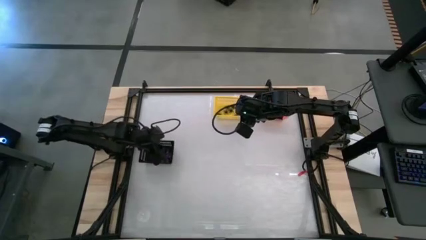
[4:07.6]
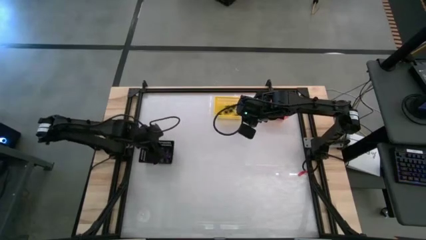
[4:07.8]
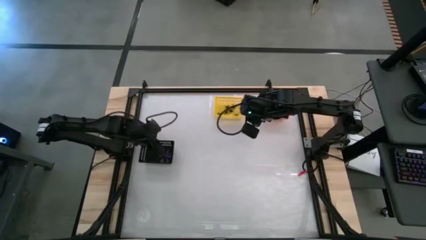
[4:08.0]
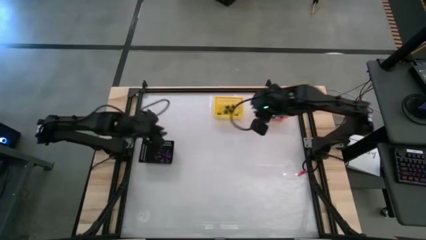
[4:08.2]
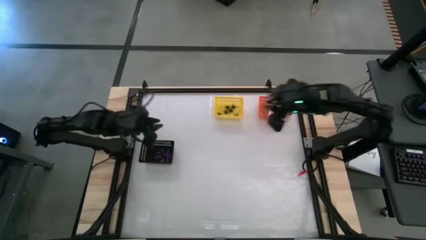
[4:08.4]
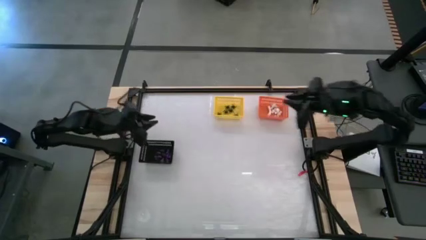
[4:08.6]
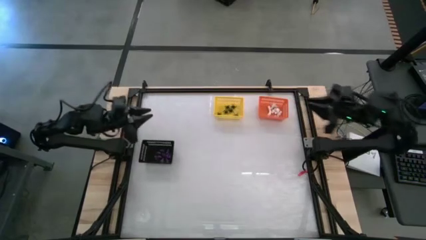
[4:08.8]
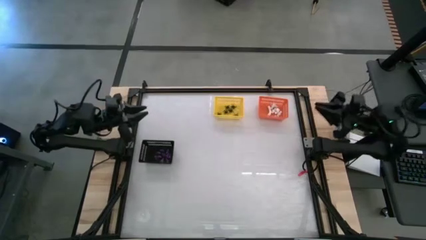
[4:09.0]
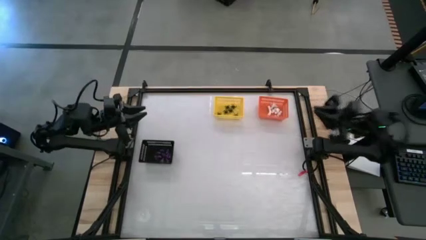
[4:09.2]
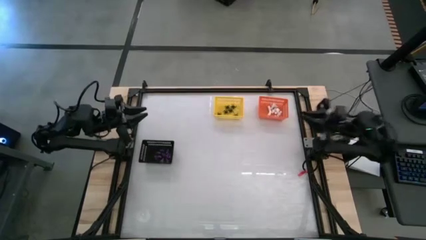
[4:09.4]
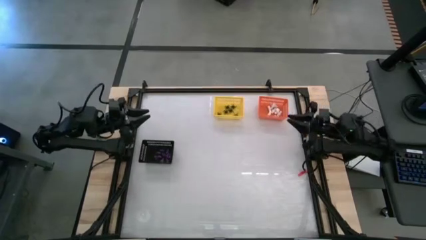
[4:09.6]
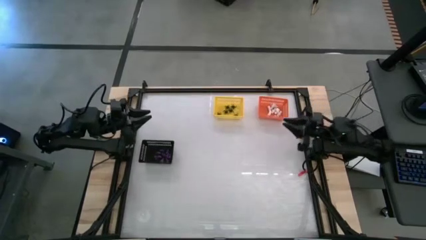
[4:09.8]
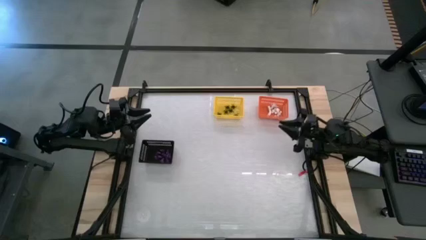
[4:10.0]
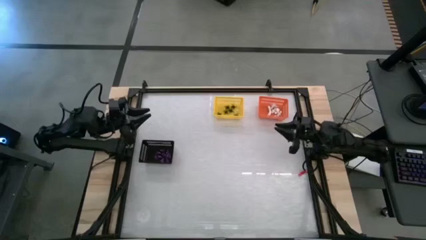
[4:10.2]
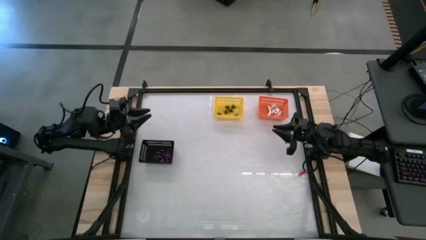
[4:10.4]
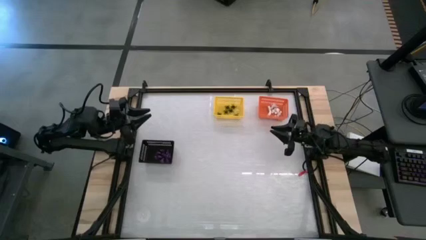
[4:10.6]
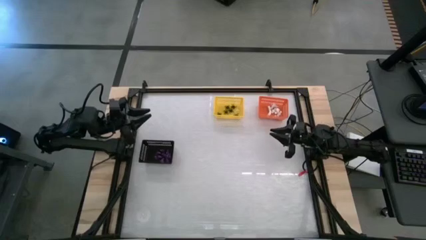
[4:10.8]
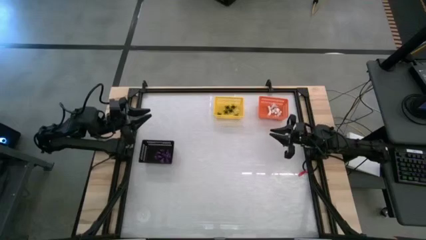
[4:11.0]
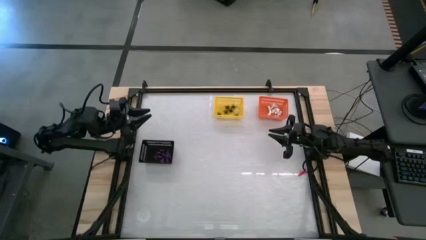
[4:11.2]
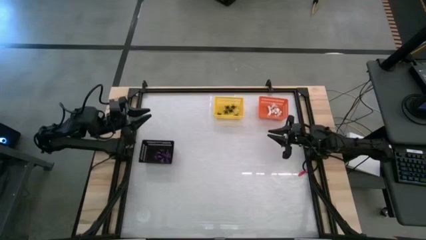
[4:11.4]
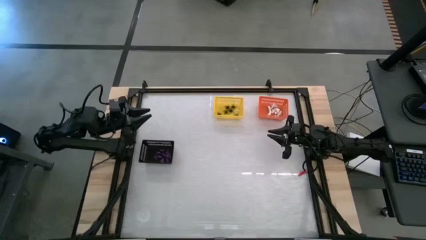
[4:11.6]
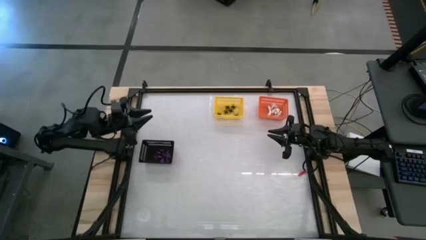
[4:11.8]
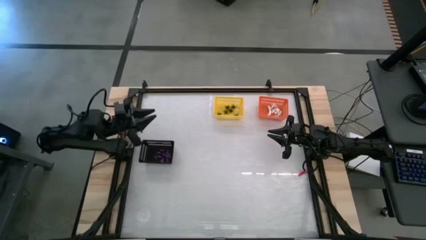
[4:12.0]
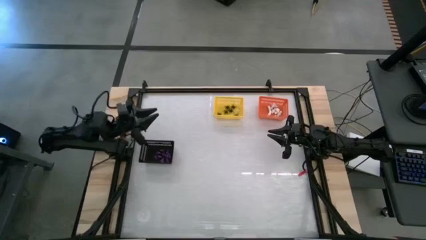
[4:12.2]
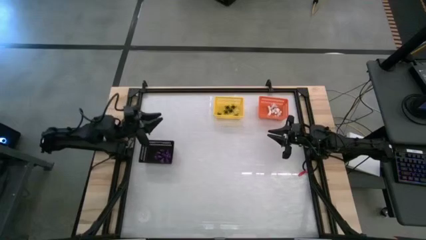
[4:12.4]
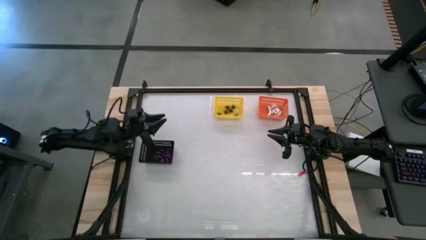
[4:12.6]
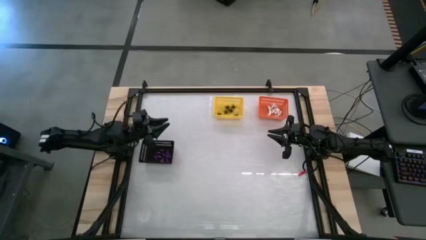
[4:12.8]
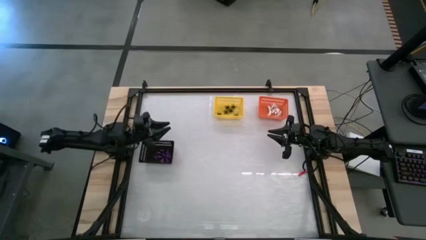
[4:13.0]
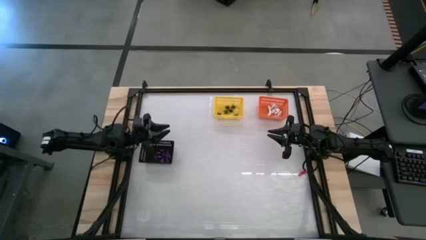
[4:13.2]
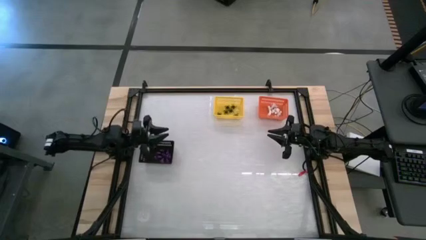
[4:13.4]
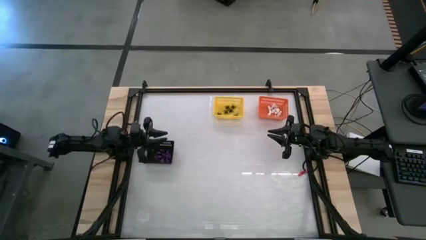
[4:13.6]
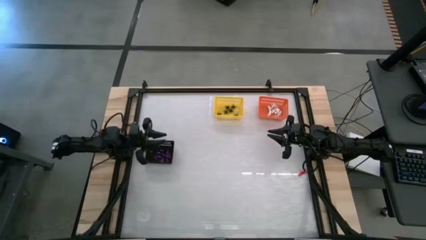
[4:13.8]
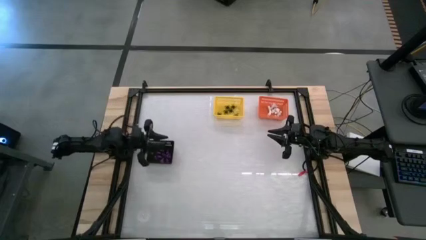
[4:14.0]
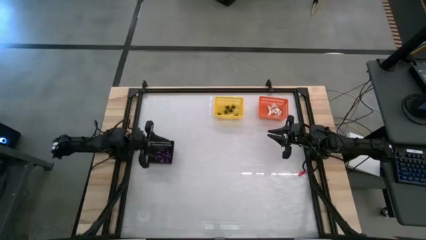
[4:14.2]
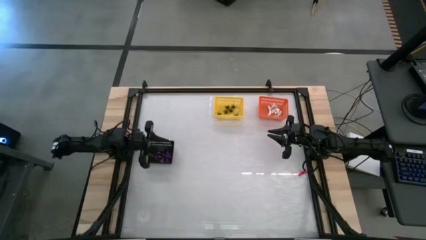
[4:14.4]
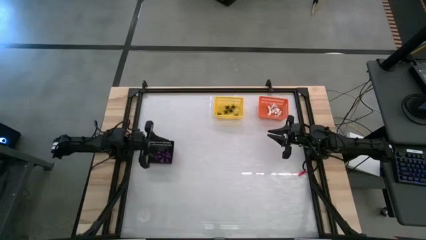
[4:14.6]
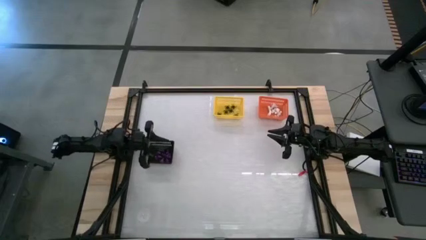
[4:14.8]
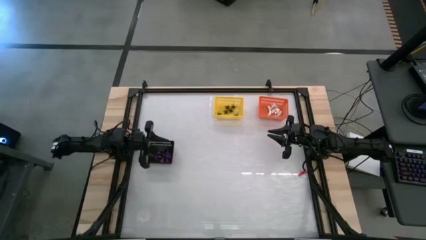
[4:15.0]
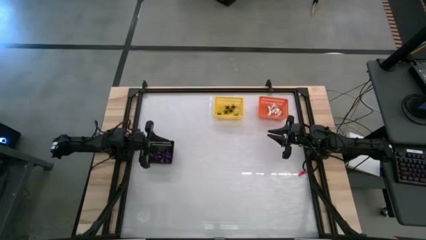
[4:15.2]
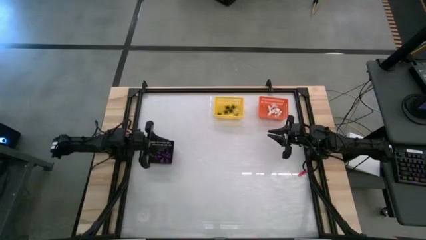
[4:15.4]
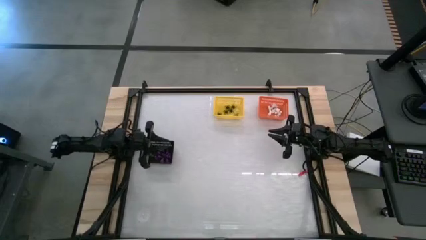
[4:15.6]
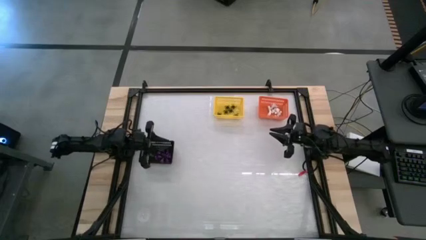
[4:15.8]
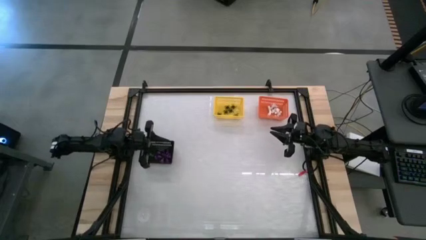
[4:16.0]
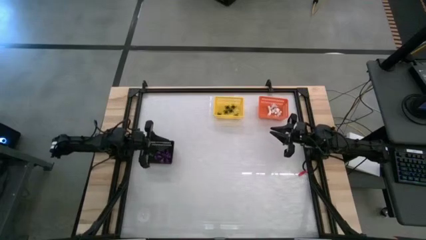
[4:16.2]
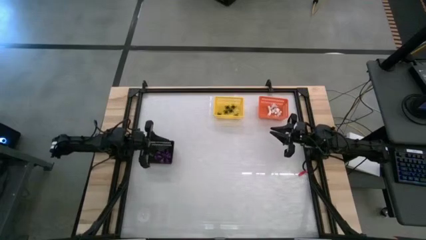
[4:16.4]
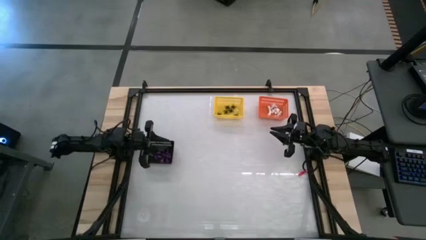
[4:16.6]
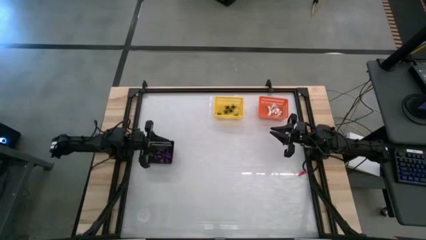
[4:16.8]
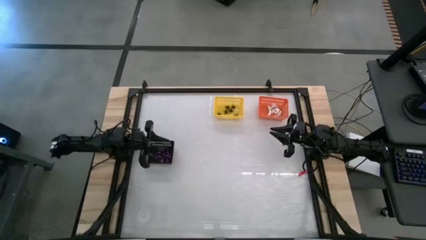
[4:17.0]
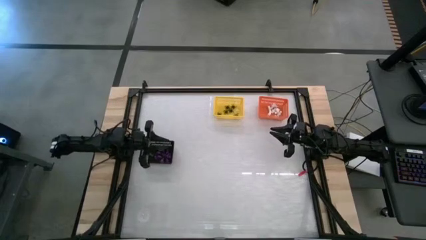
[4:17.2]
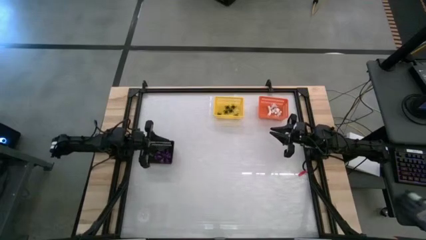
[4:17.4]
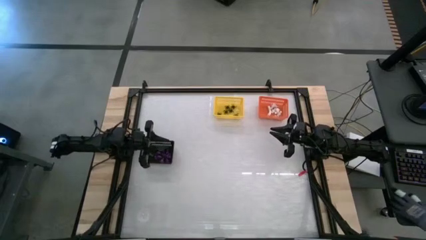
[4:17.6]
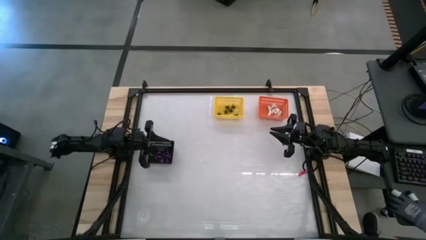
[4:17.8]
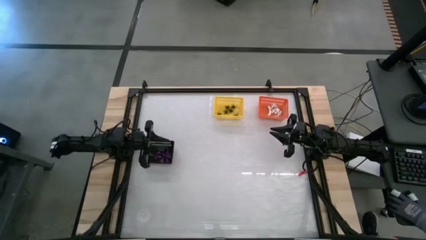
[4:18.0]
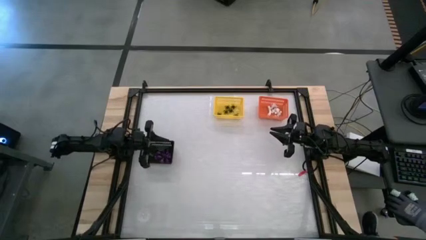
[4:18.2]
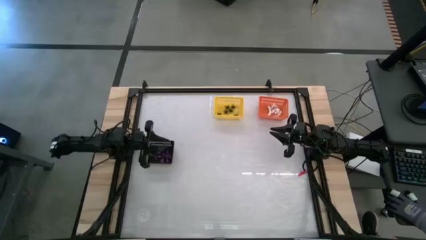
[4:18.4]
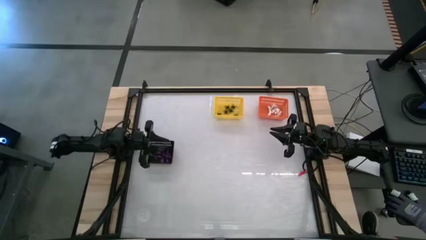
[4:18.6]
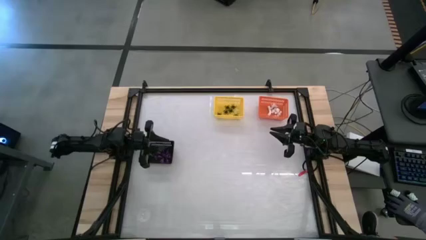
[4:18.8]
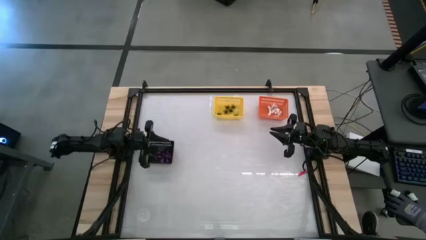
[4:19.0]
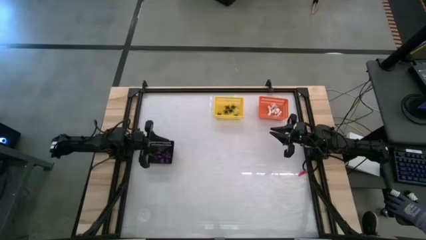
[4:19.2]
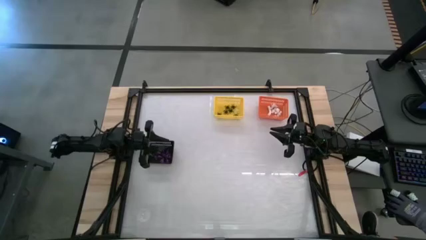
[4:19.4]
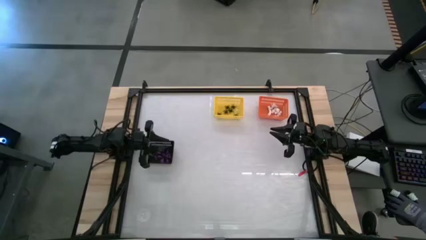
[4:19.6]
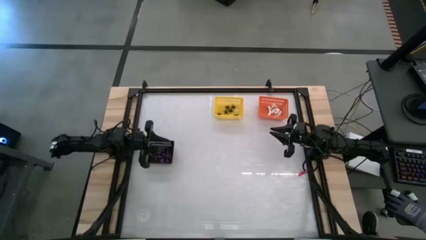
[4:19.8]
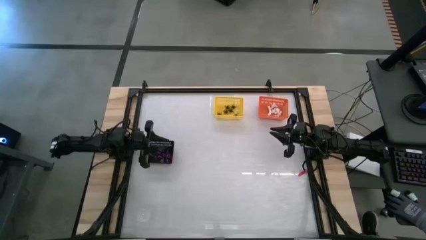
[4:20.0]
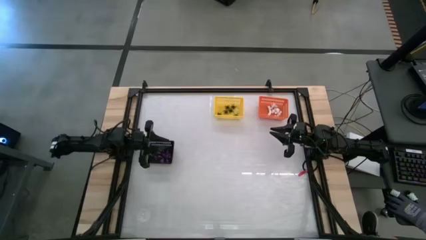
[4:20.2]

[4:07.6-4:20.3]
Task: Sort Halloween decoration
Return to Home Position

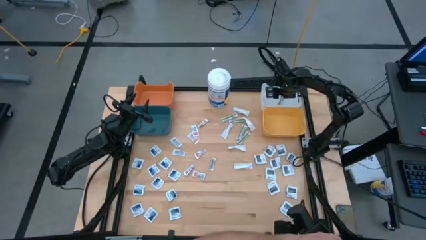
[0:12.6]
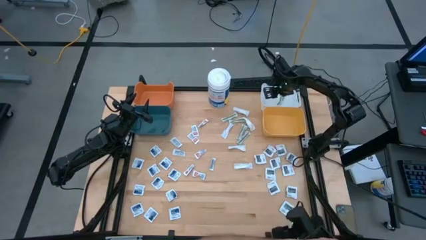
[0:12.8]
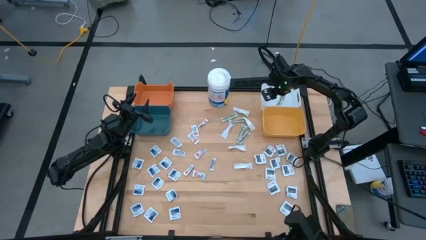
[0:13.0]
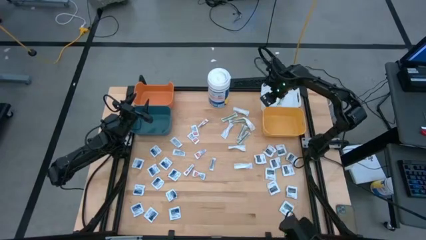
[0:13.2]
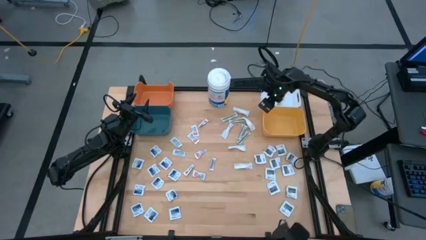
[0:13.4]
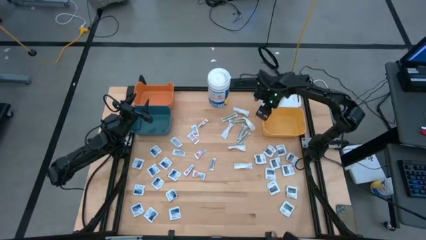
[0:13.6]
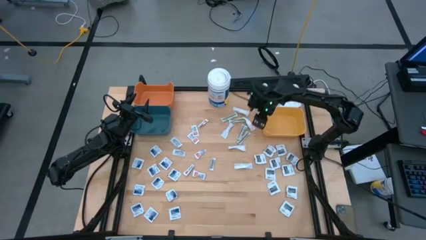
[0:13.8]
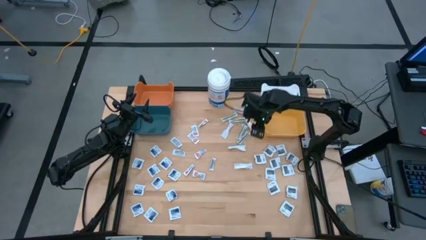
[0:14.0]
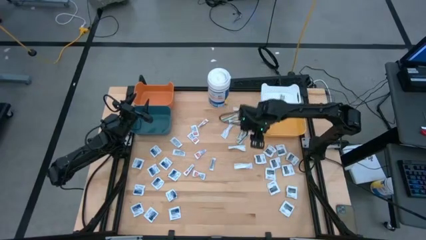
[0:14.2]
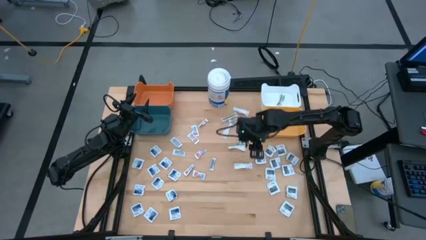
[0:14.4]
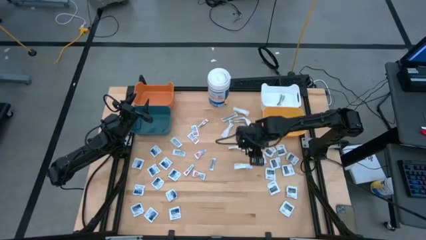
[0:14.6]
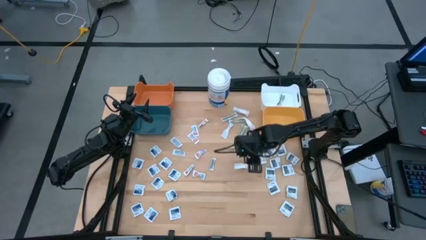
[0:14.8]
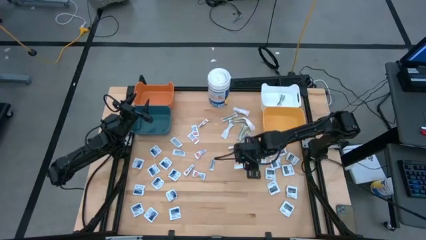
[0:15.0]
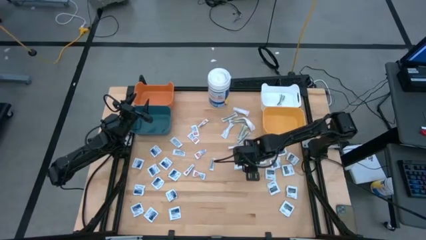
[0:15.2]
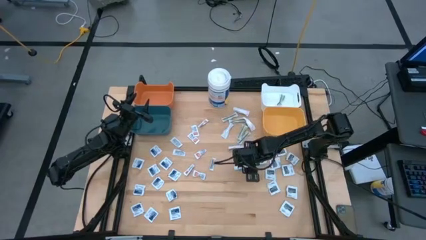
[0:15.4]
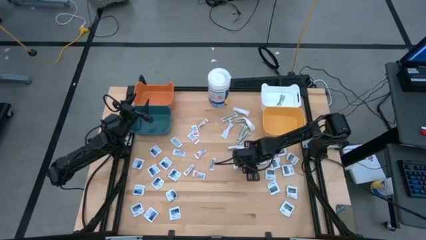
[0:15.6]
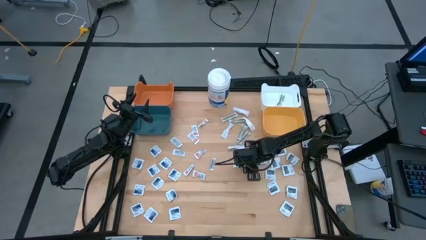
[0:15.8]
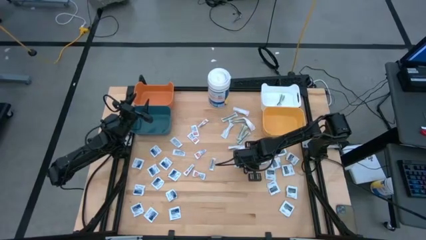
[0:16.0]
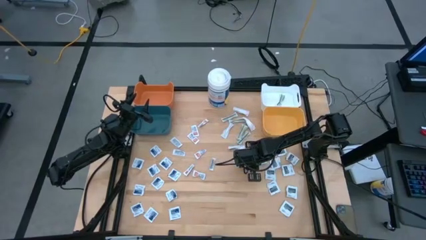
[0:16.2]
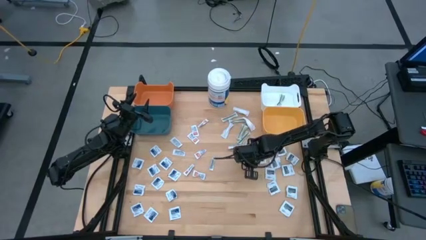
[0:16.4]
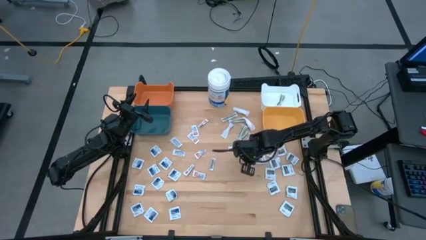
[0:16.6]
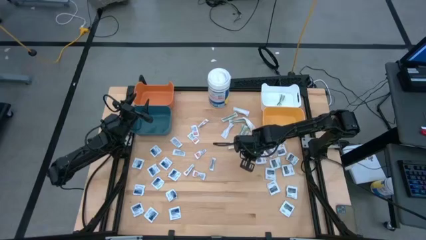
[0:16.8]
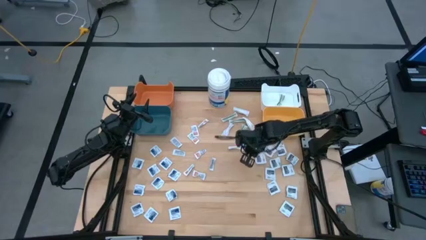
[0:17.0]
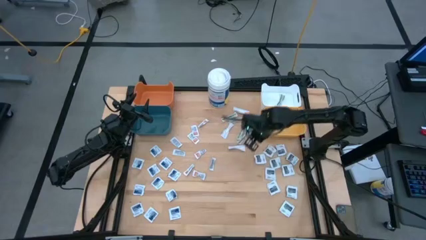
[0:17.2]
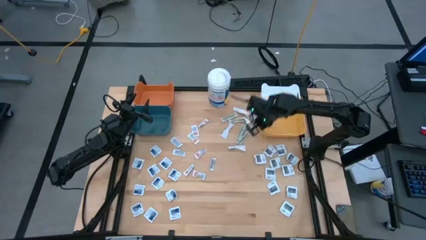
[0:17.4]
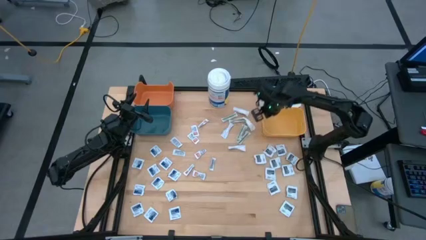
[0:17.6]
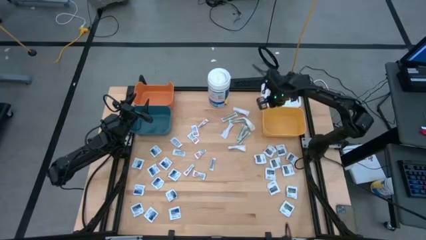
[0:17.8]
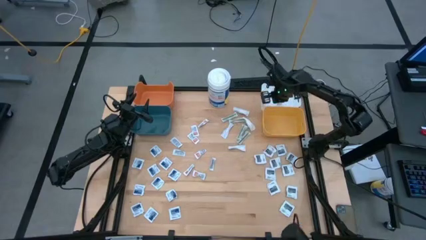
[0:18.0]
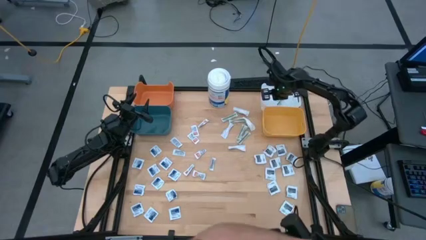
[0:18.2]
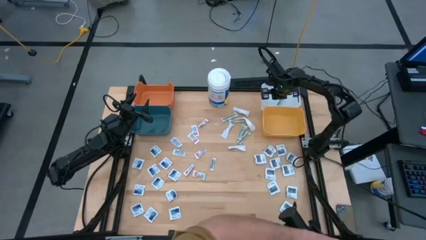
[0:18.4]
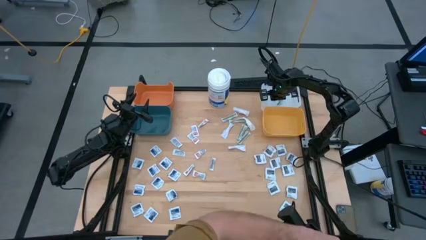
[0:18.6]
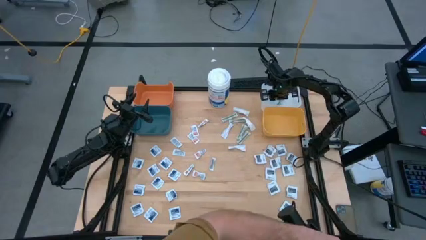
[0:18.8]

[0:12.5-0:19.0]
Task: Pick & Place First Aid Supplies
Put the green bandage into the white bin
